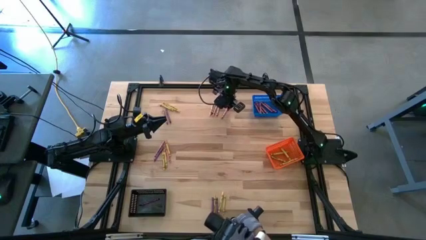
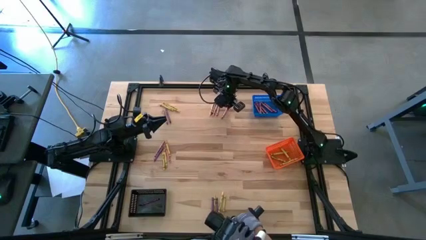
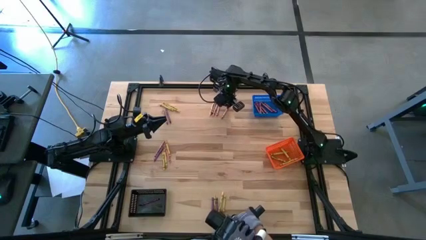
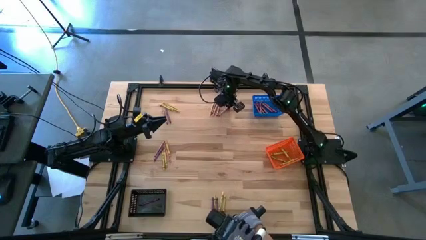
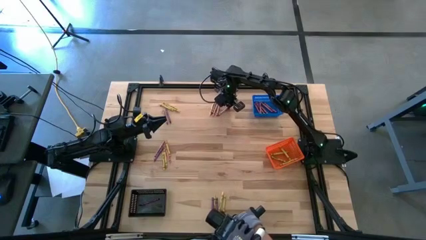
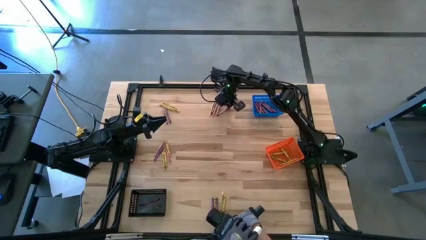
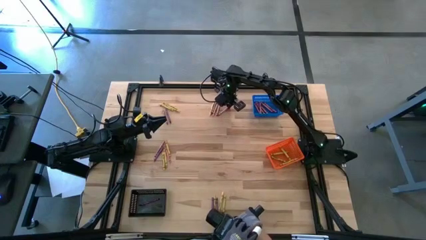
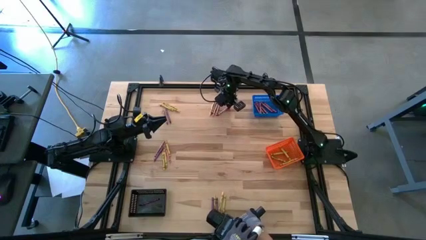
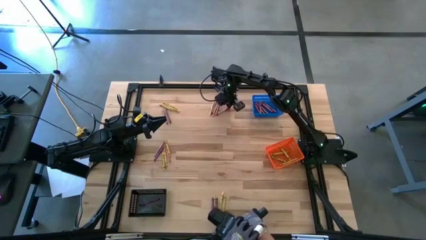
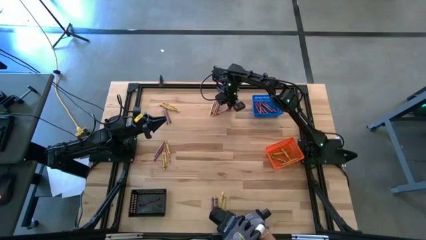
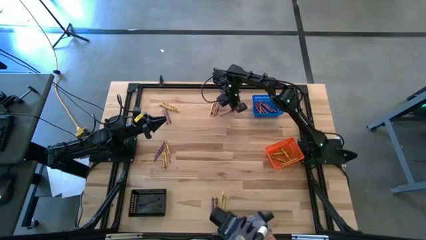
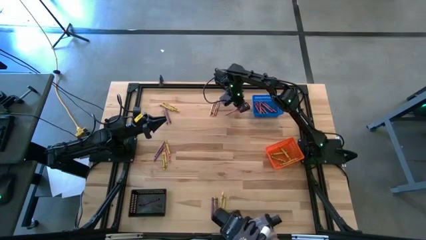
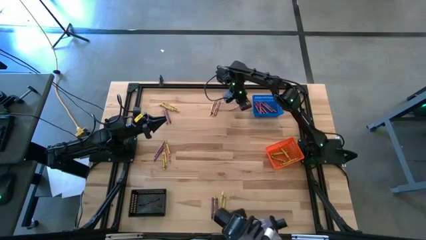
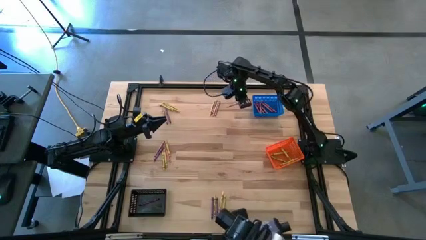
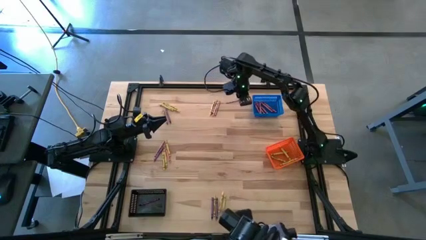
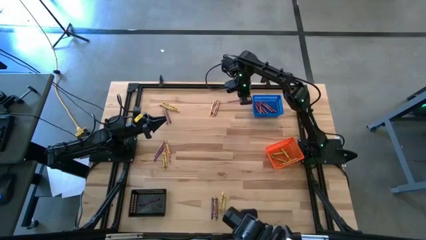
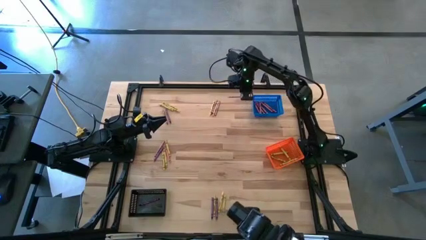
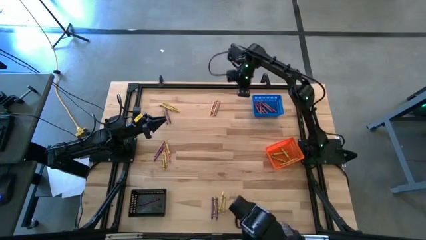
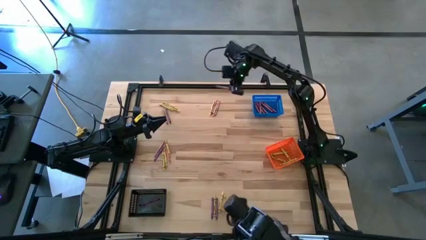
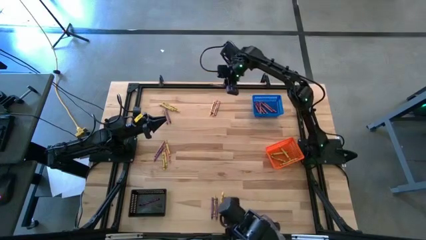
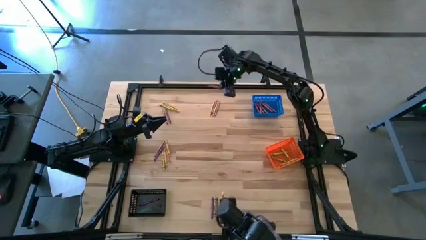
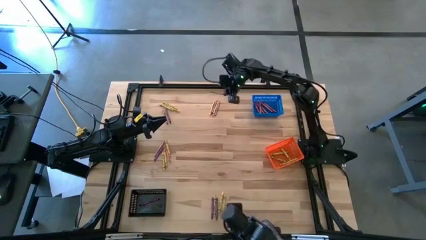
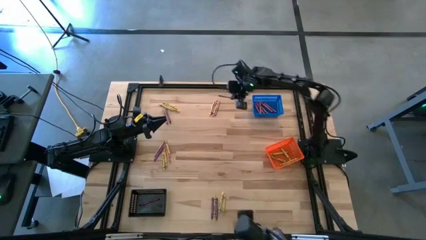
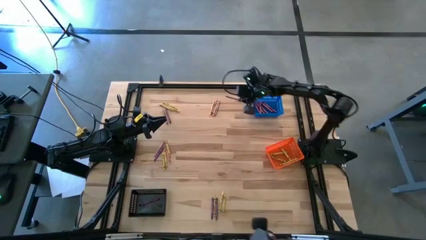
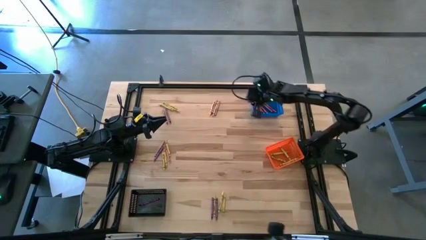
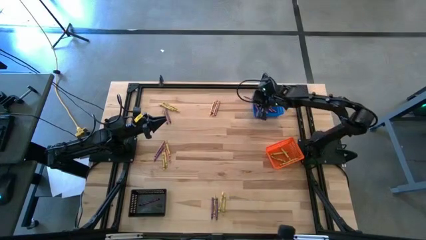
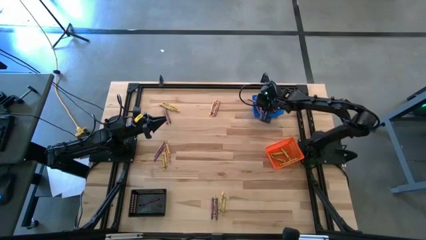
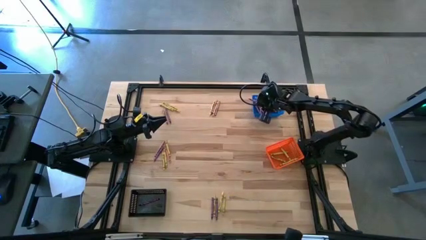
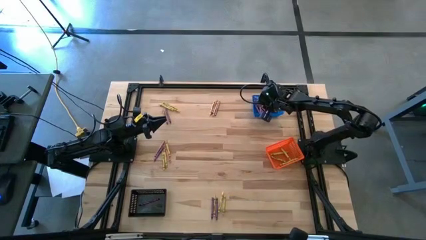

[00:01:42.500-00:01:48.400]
Task: Sort crayons
Put the red crayon into the blue basket

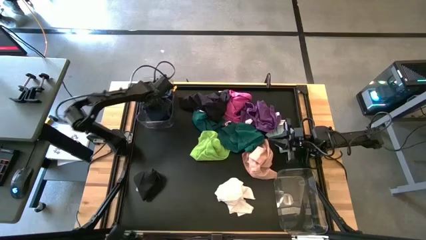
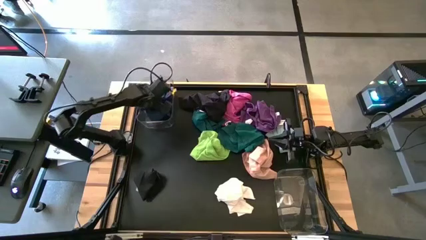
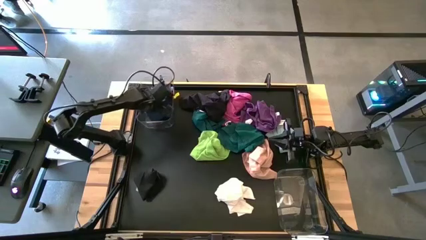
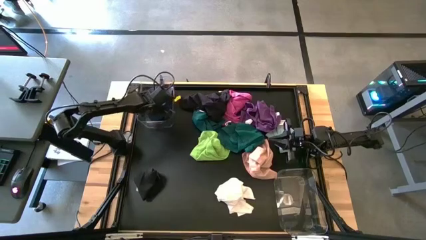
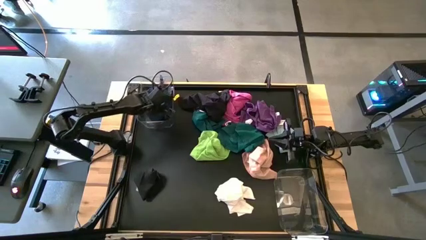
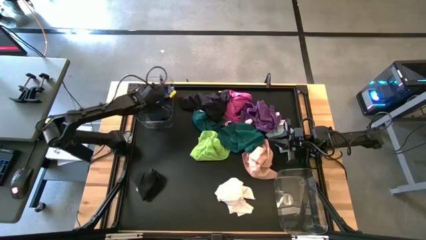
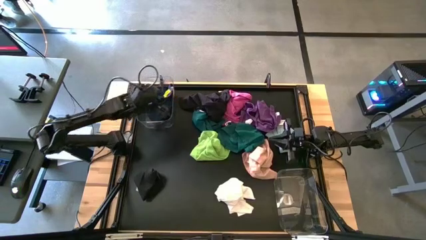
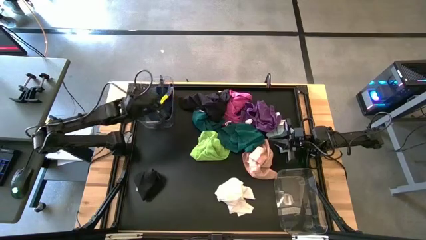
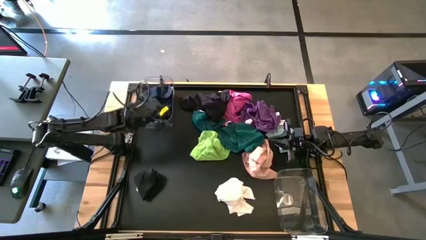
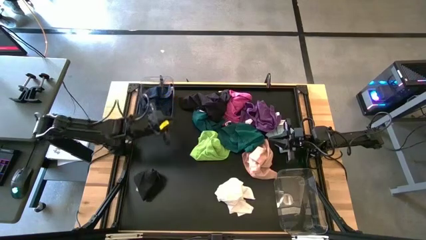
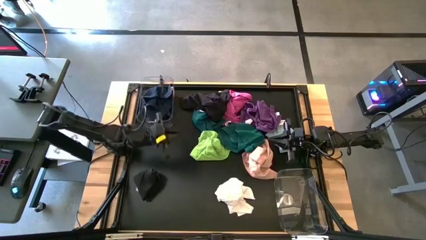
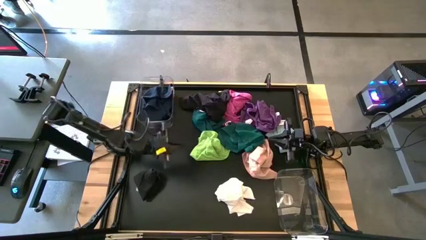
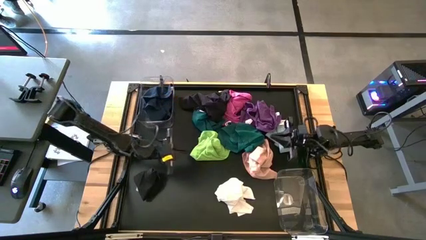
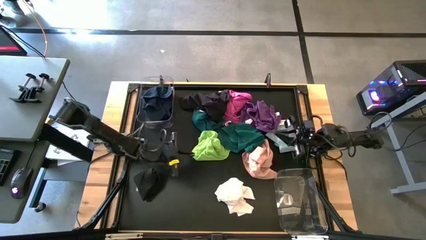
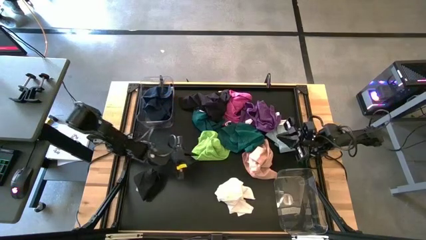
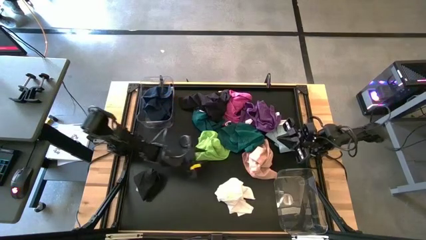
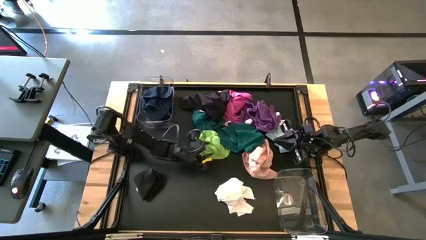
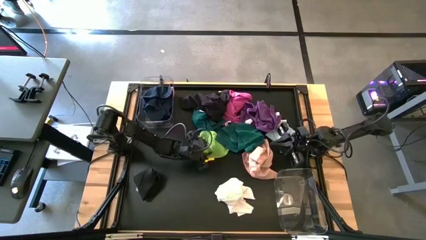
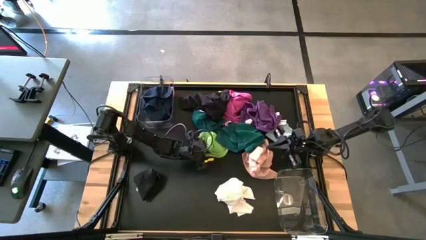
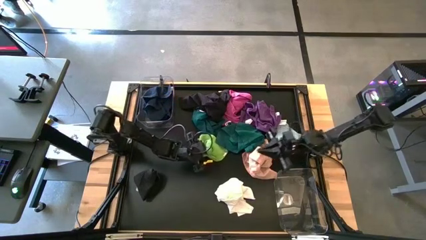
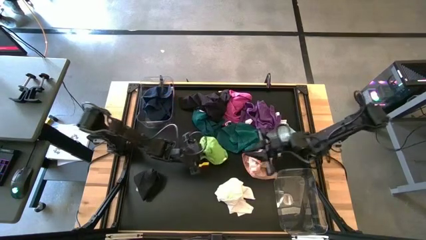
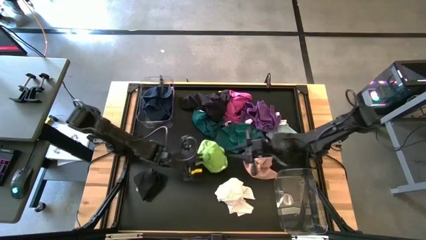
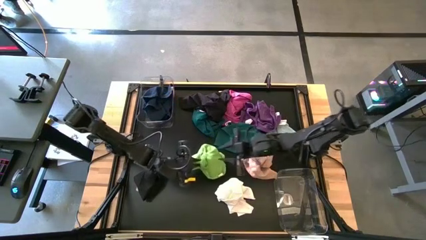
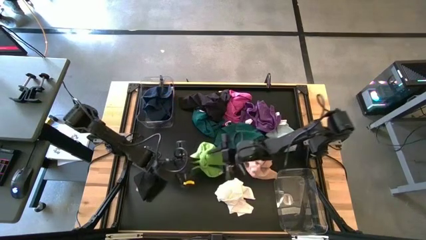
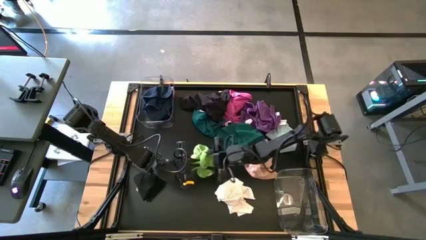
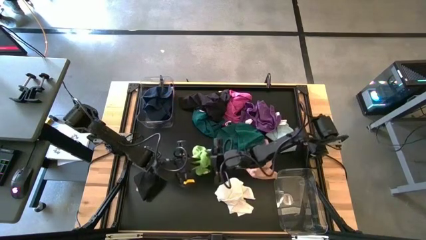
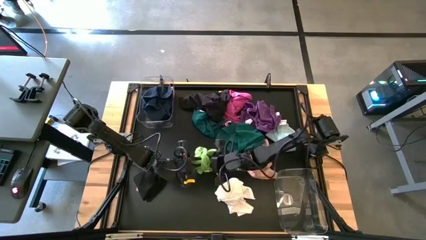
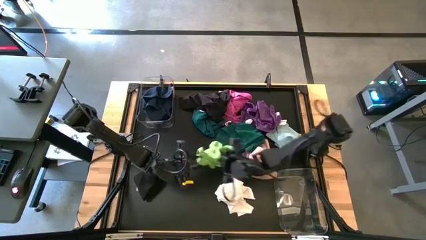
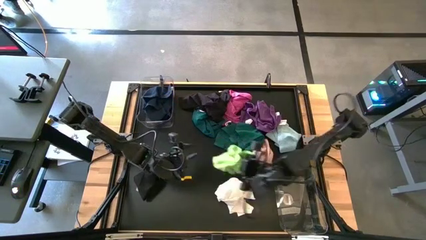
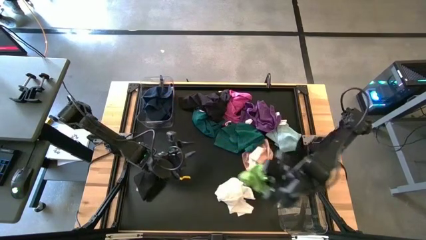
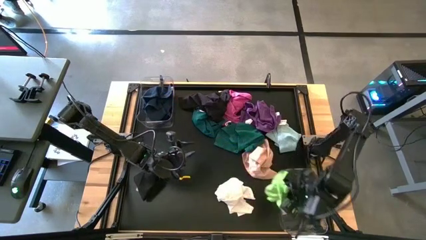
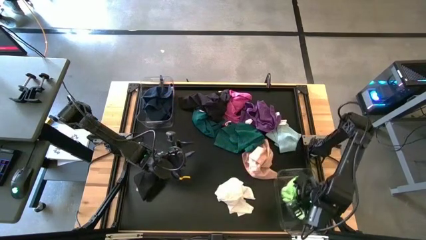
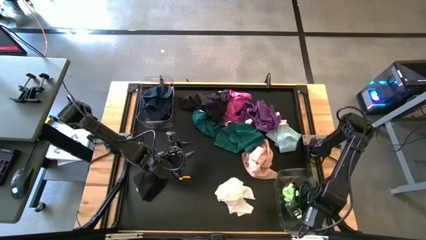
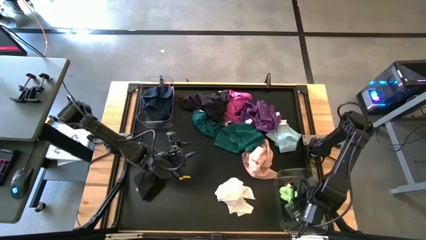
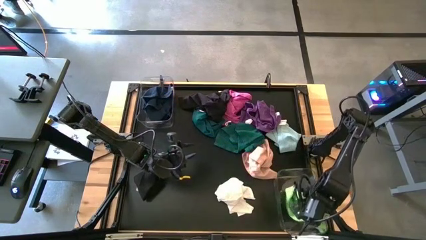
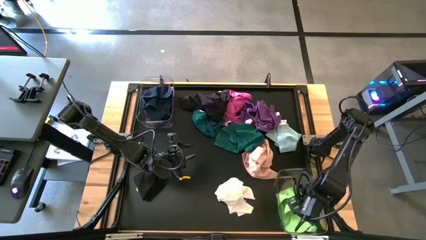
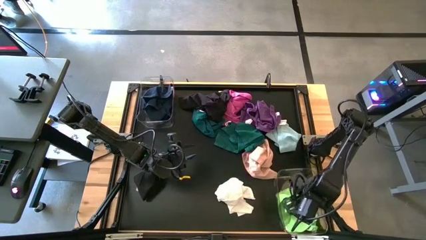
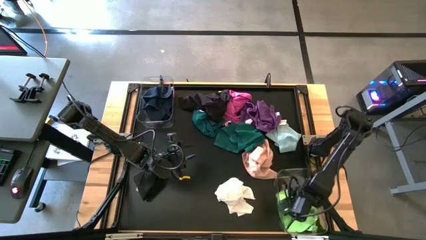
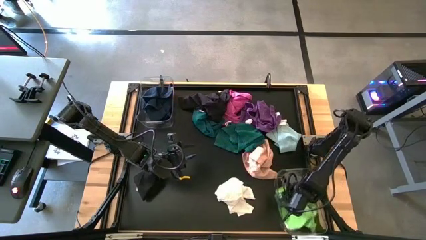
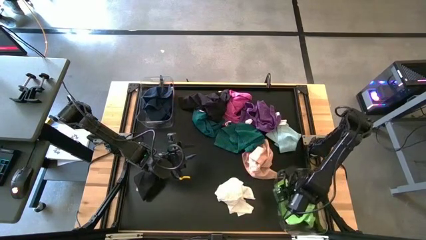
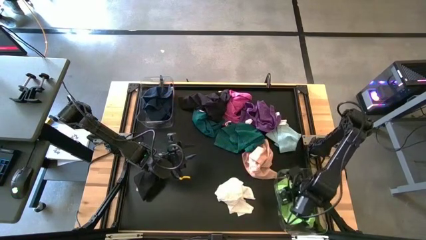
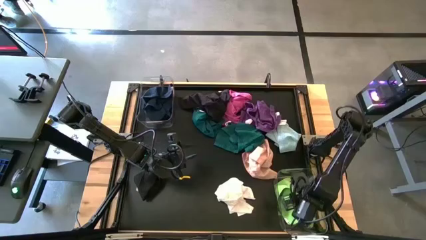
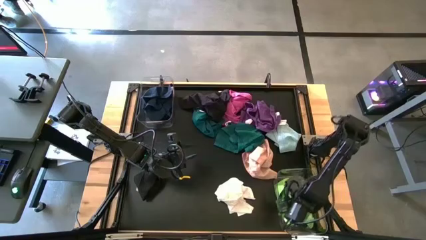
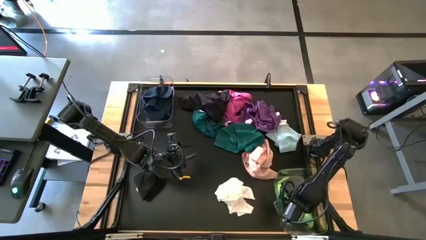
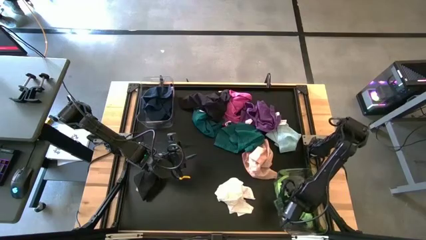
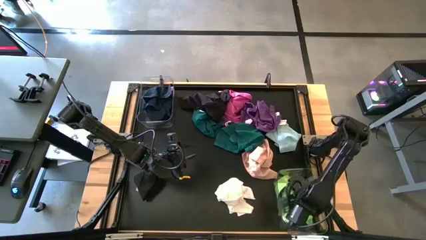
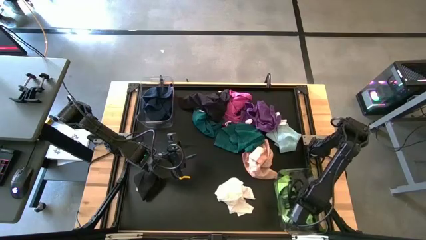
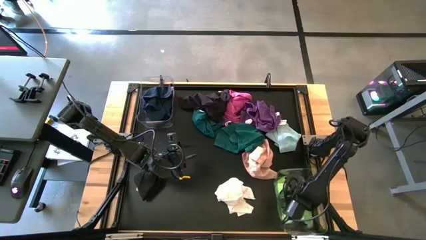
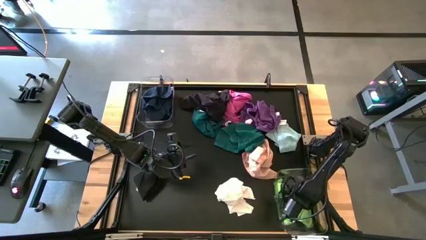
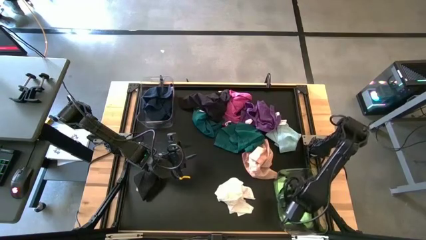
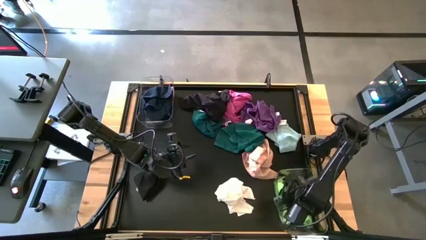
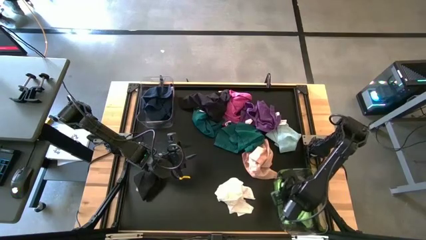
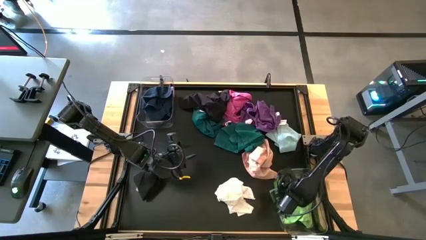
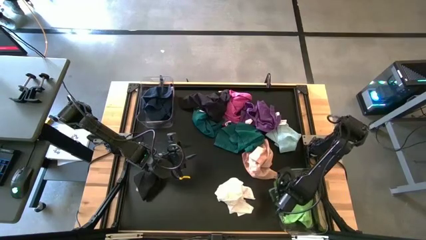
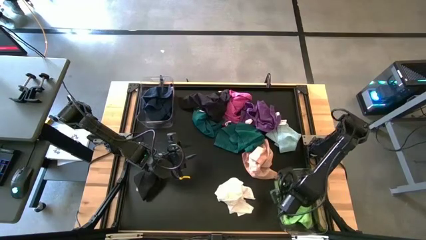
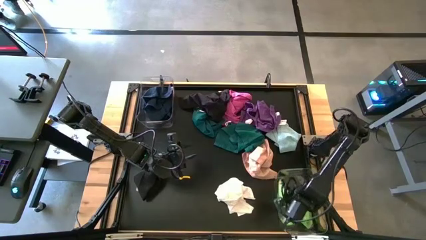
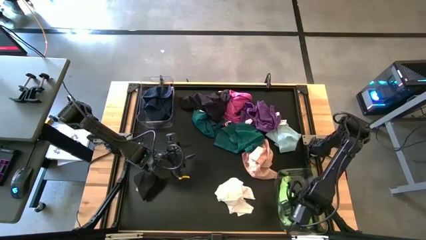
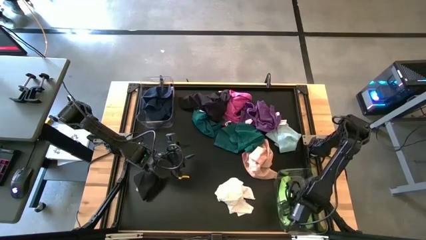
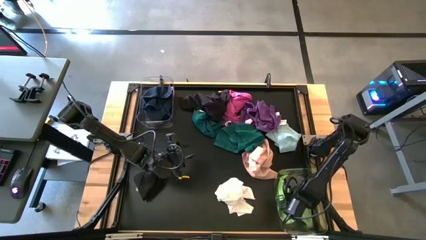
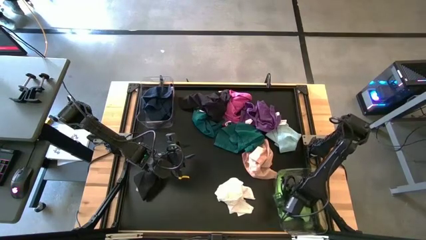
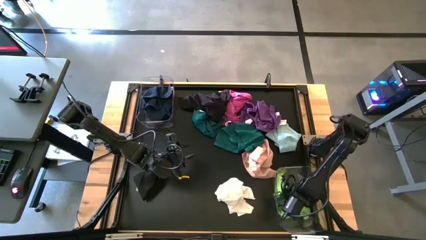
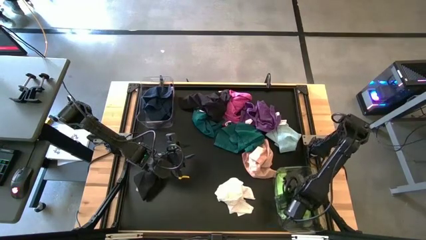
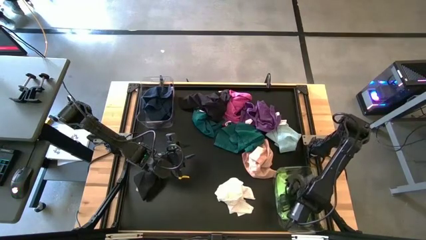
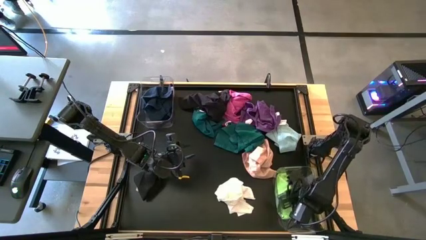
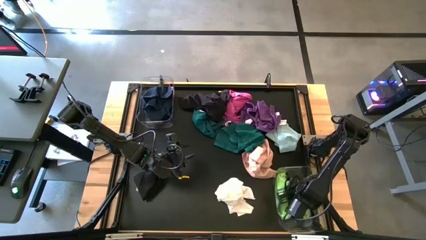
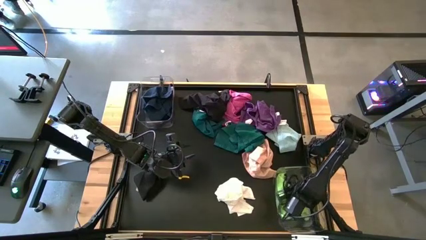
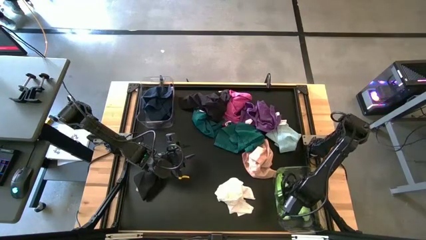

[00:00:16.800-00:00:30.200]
Task: Sort towels by color in basket
Put the light green towel into the bottom transparent bin
